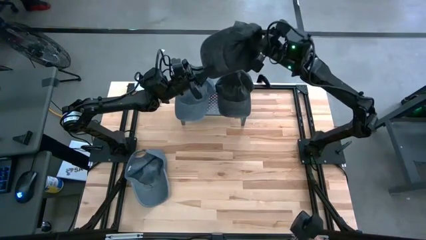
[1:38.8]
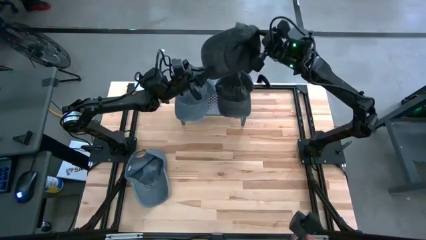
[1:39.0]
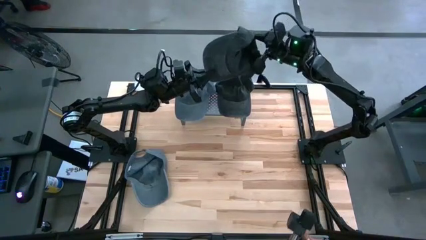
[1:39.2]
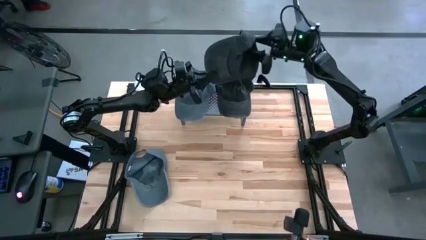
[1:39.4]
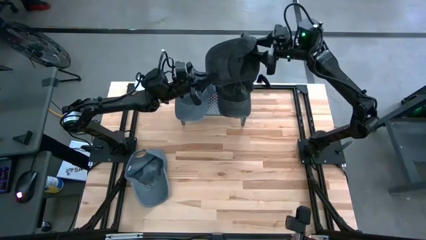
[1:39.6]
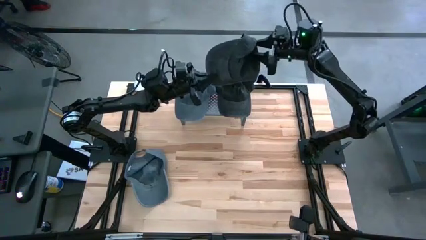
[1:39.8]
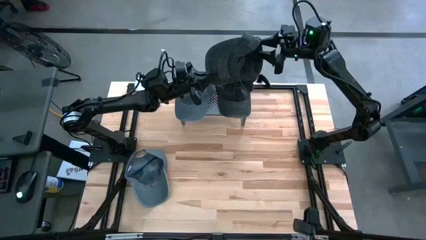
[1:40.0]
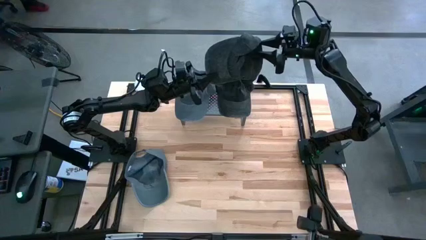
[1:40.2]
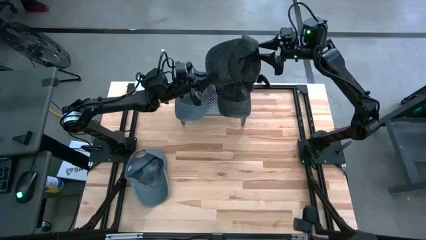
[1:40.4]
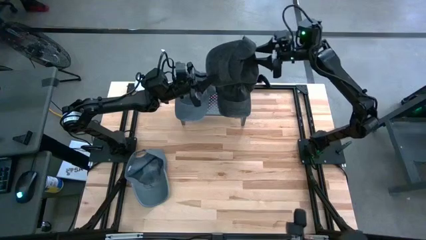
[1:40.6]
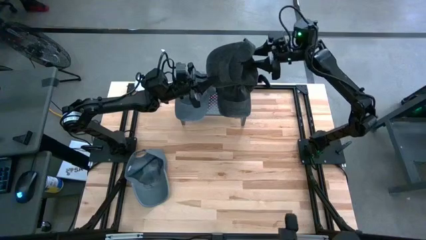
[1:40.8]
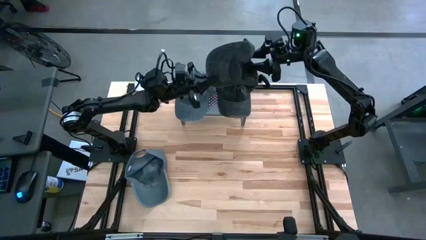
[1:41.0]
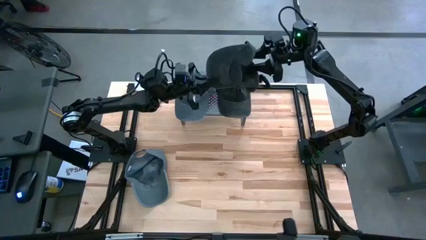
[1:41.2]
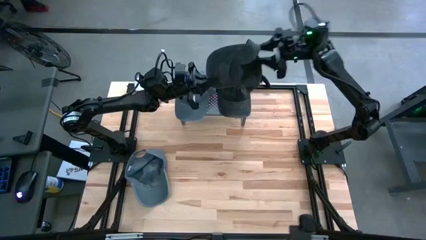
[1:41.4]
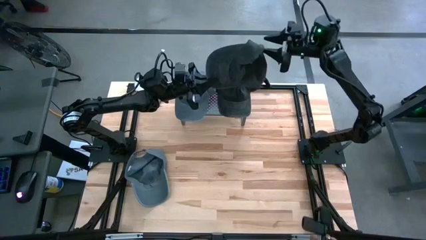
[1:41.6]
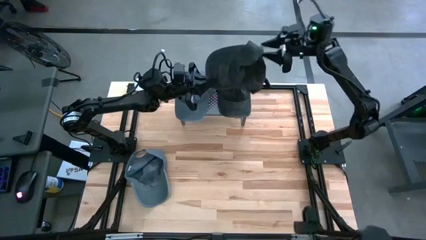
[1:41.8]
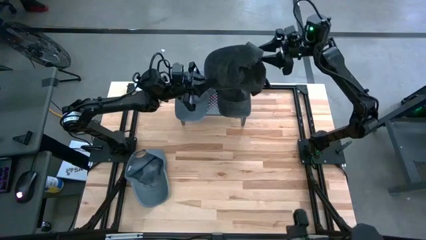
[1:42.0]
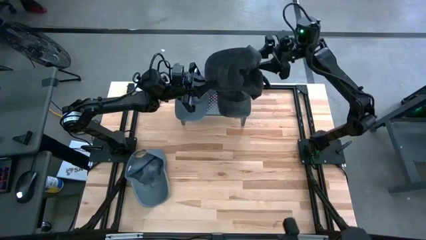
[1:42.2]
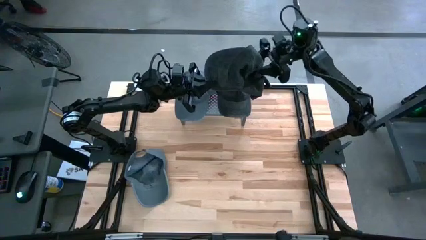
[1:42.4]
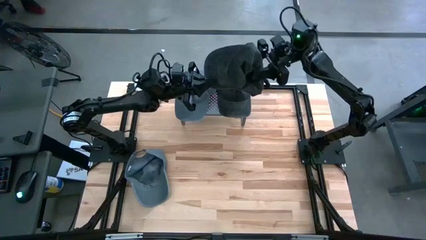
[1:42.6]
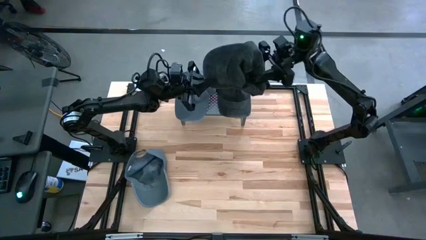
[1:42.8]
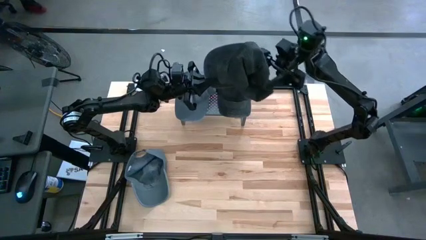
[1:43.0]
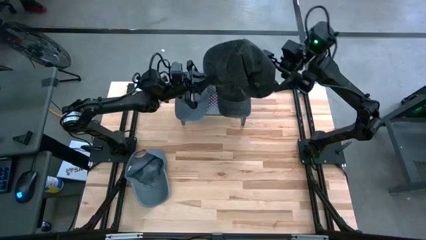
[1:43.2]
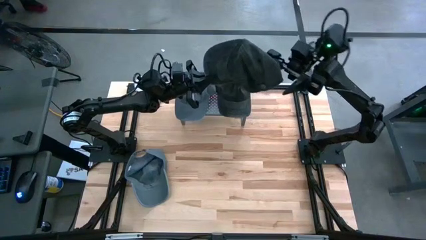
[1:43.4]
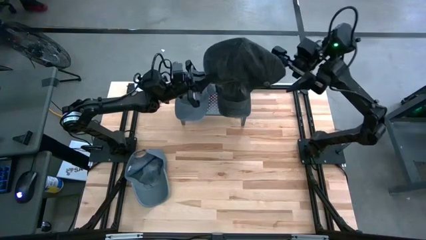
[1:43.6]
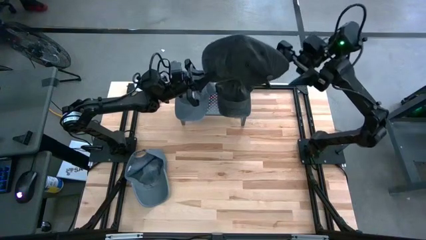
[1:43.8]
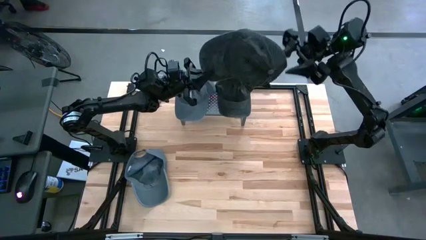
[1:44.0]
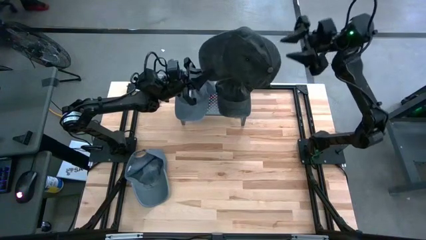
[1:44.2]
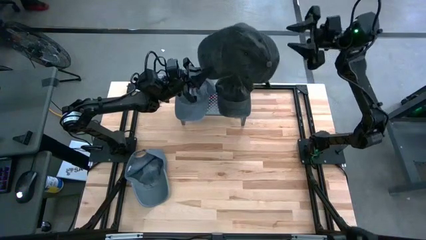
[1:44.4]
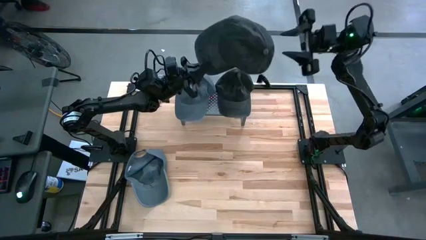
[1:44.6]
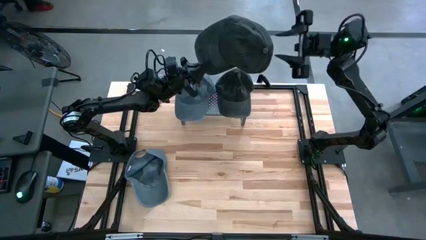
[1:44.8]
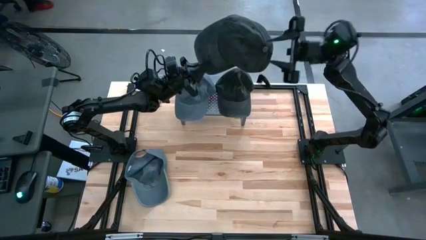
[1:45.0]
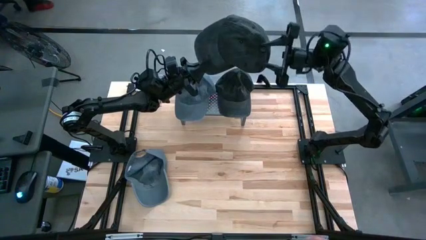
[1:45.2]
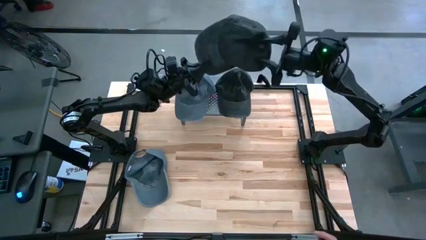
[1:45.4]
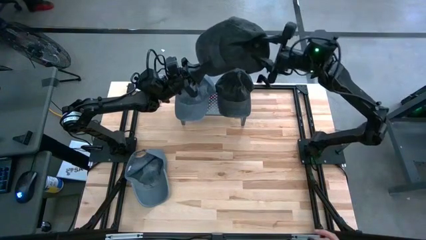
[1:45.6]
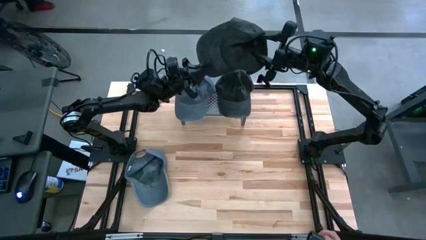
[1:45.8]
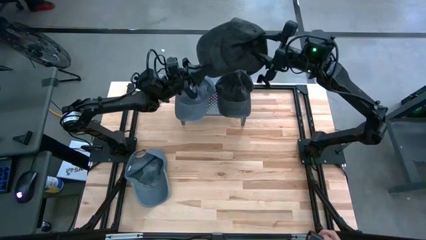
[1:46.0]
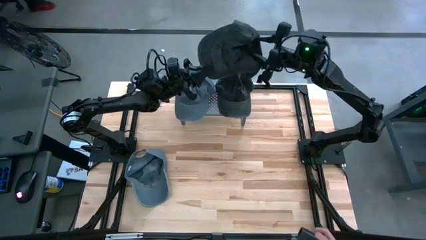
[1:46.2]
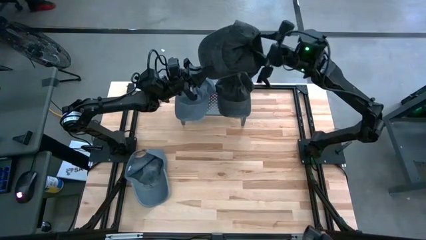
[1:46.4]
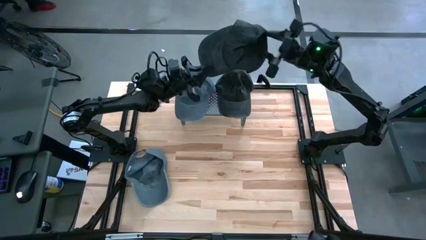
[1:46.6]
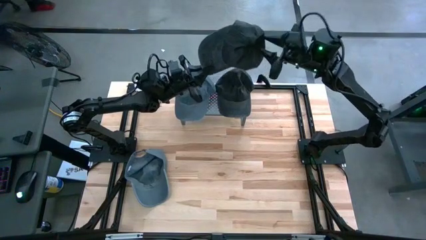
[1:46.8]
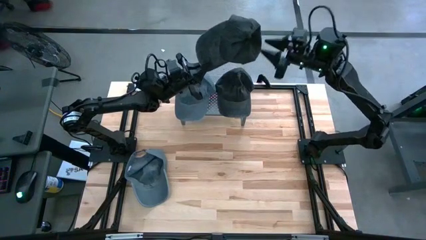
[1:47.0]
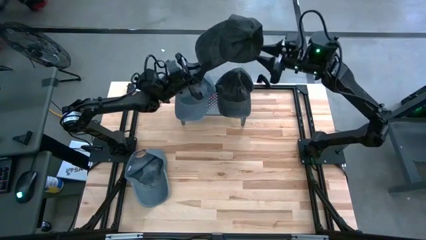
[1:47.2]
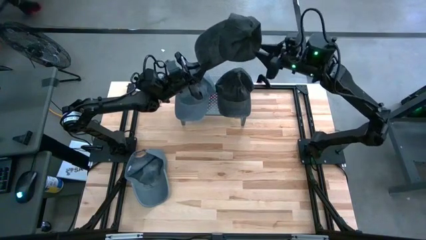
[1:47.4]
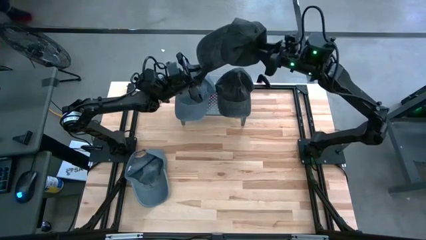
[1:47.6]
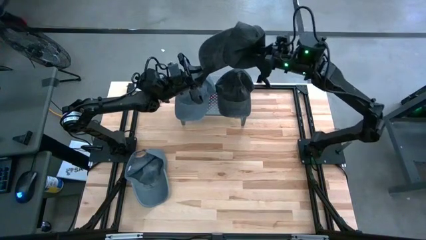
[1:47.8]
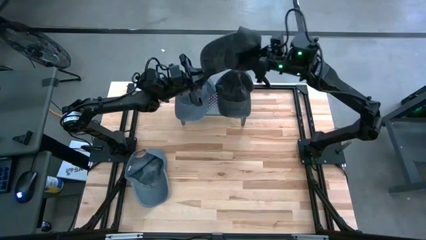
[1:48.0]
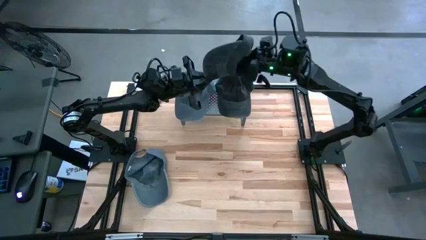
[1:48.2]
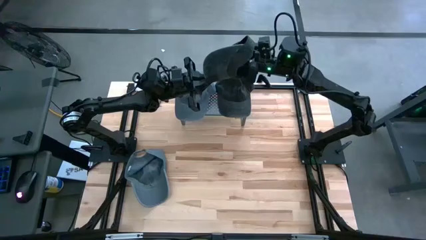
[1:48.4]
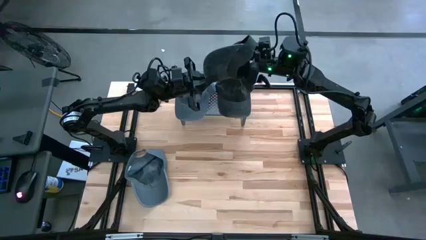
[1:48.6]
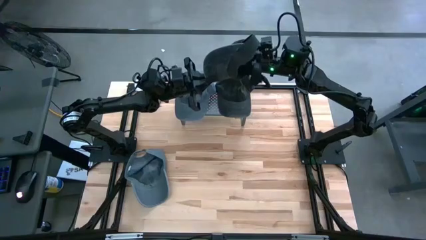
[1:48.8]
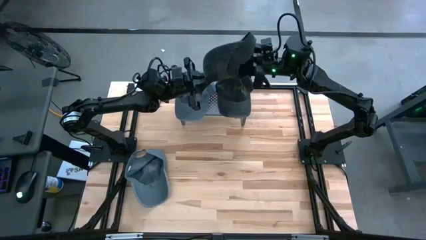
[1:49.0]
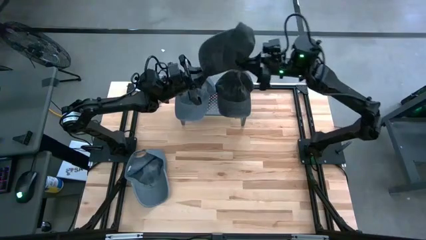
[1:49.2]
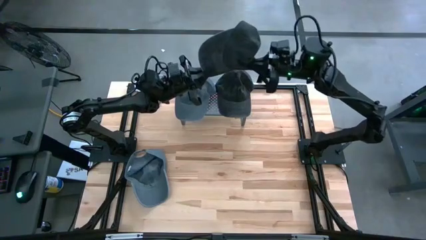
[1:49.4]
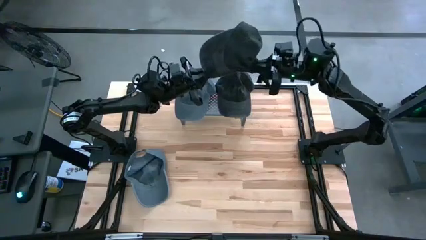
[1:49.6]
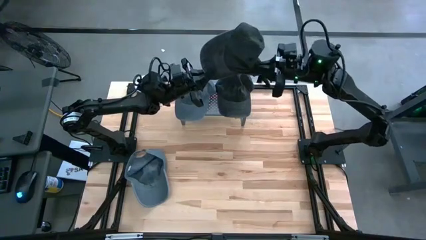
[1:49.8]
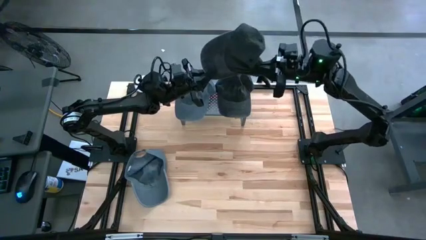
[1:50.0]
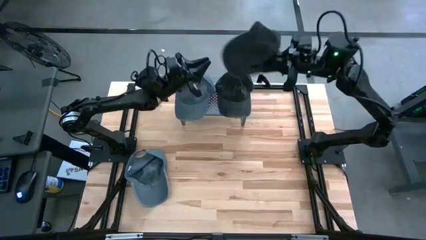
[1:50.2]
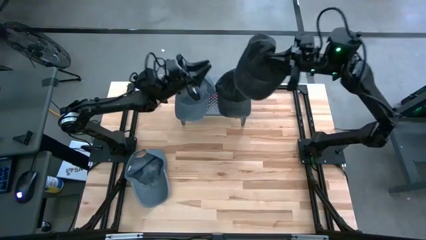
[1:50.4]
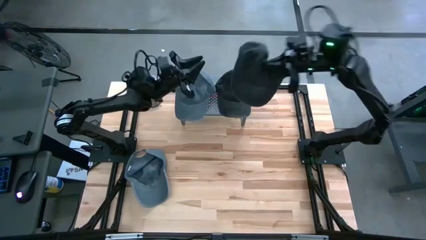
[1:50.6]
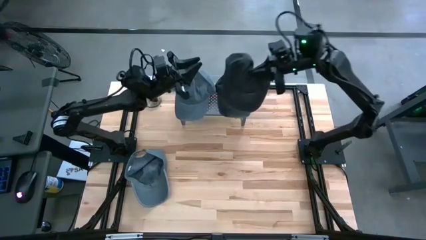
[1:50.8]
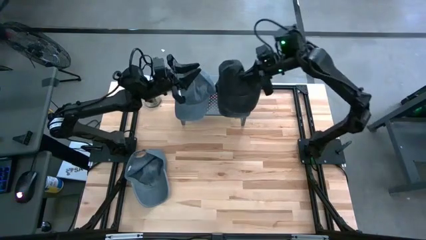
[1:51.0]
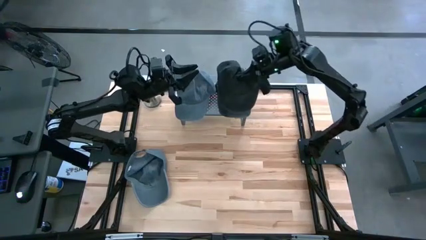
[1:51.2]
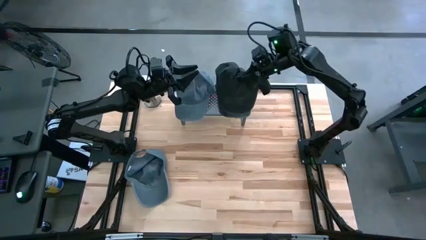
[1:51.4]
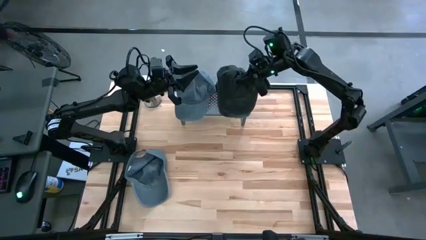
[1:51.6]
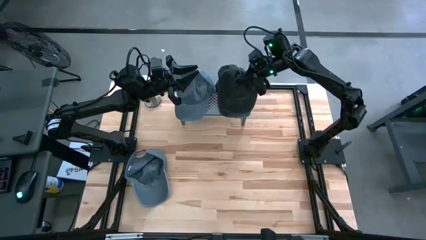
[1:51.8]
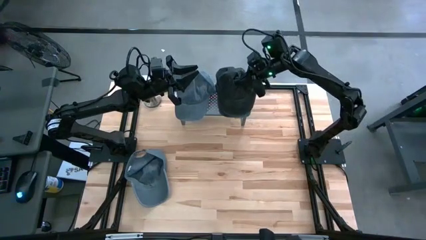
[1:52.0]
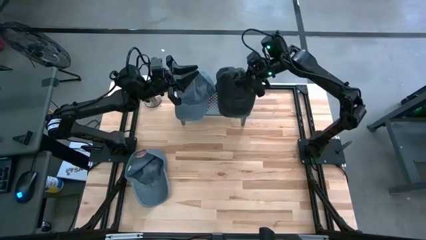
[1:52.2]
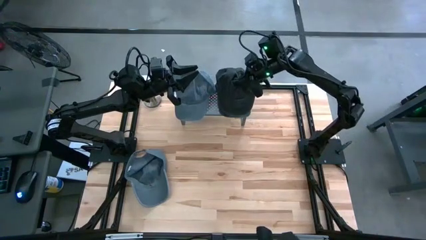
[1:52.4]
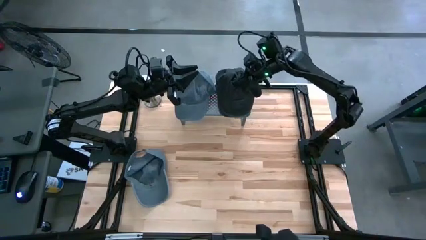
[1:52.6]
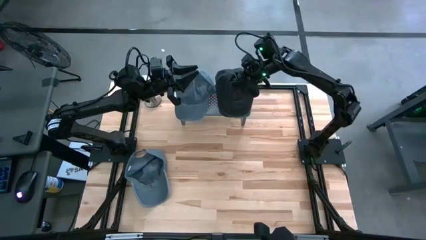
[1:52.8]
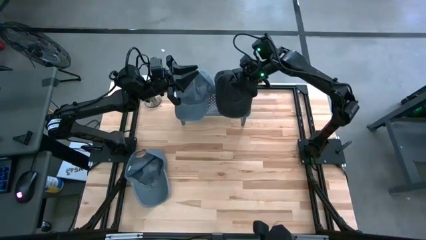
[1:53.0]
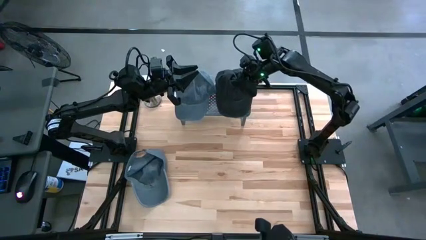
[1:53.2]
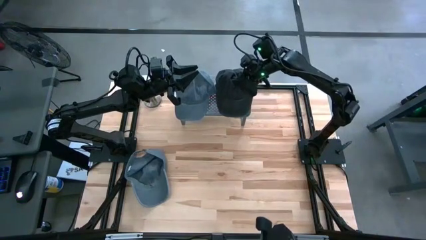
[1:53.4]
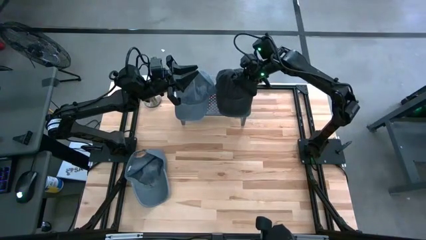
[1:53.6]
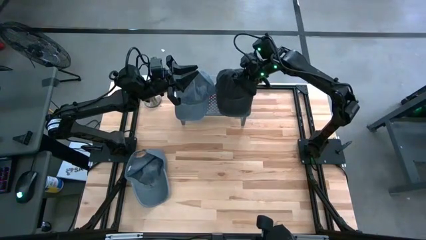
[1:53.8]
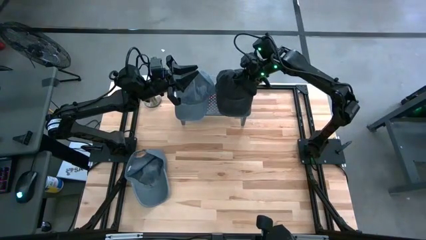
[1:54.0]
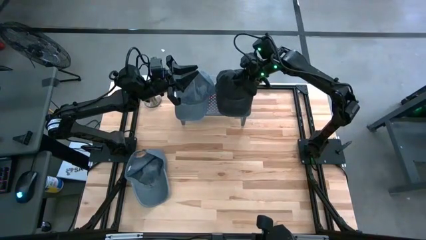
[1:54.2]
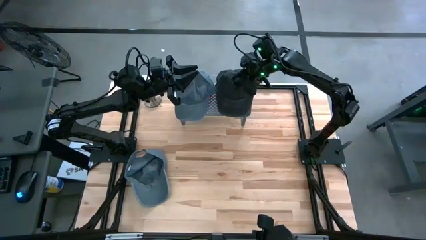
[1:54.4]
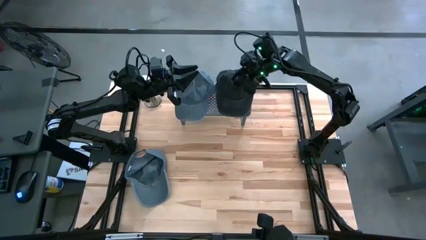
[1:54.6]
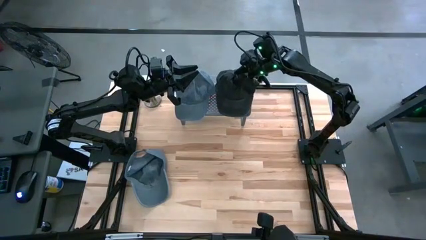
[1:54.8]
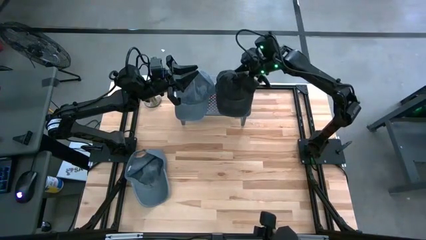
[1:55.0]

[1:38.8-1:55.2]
Task: Pick & Place hat
Stack the black cap on top of the other black cap on the shelf
